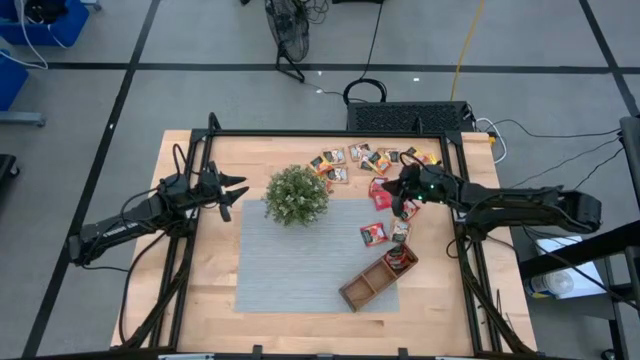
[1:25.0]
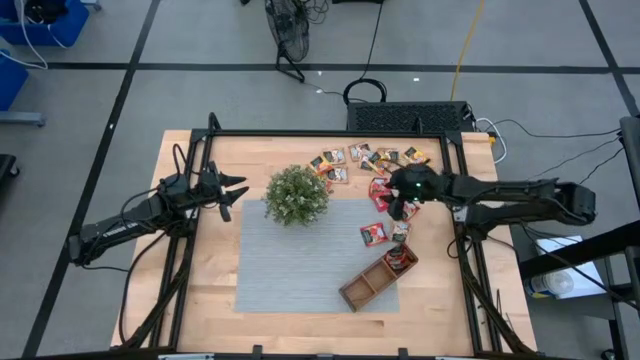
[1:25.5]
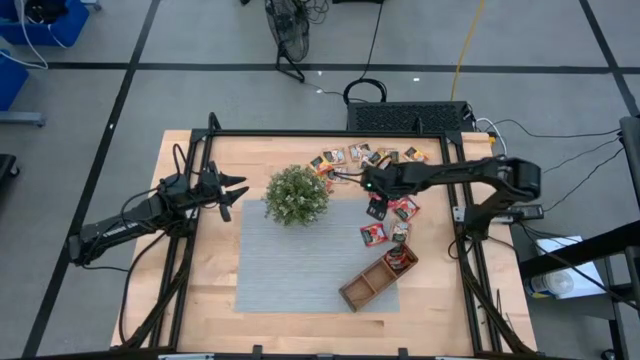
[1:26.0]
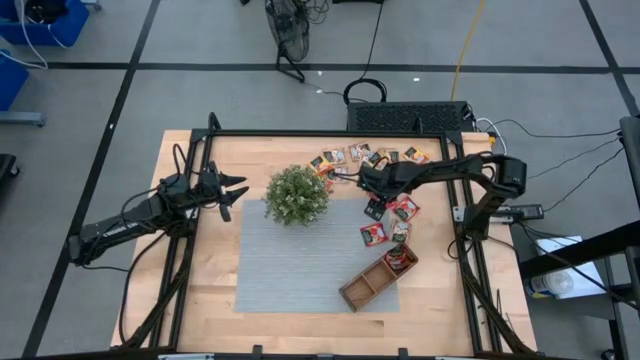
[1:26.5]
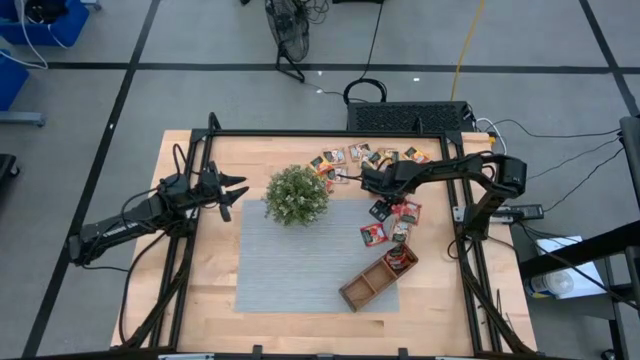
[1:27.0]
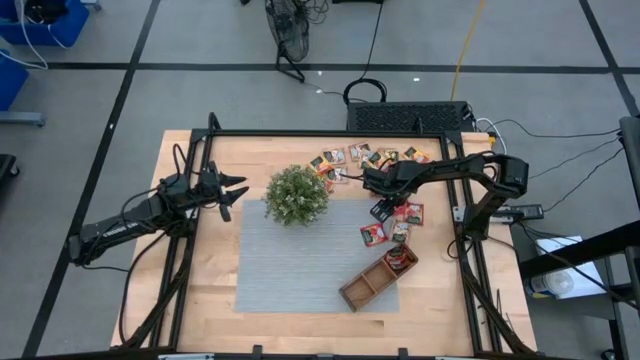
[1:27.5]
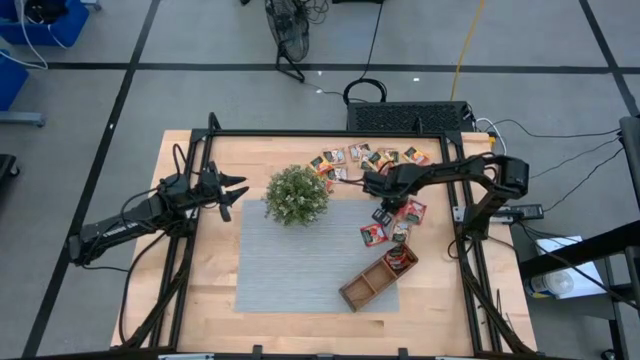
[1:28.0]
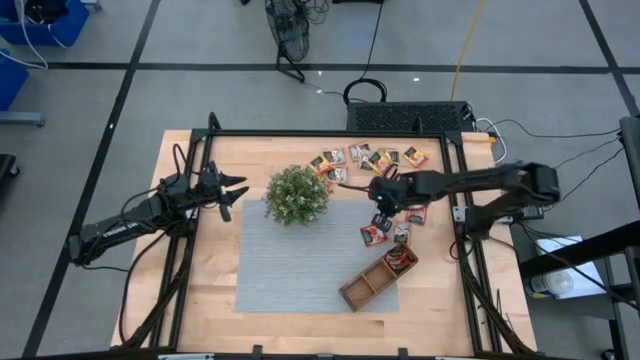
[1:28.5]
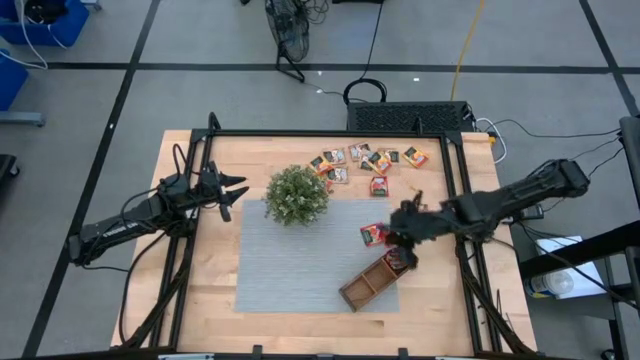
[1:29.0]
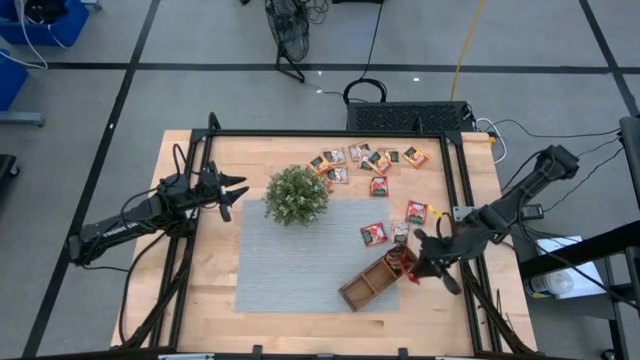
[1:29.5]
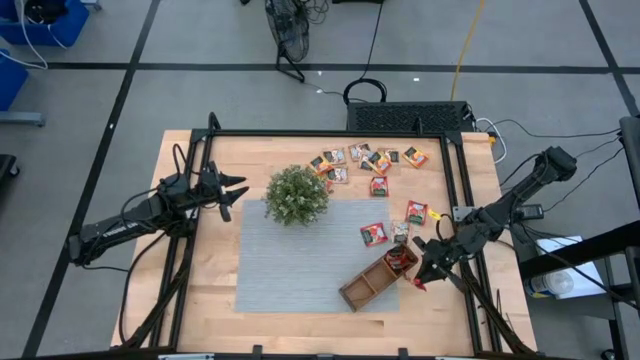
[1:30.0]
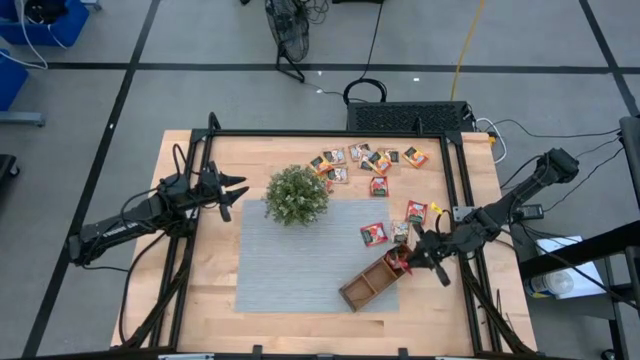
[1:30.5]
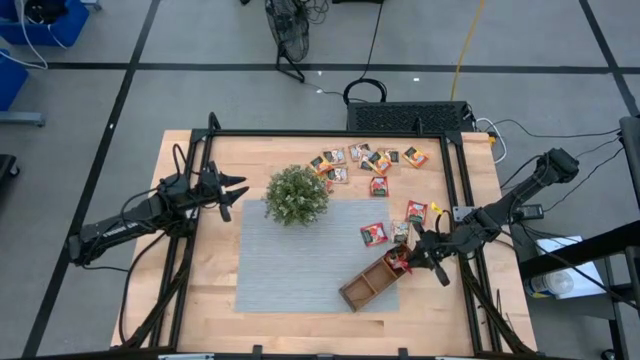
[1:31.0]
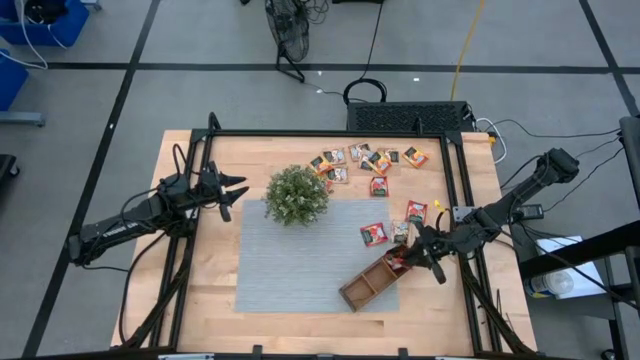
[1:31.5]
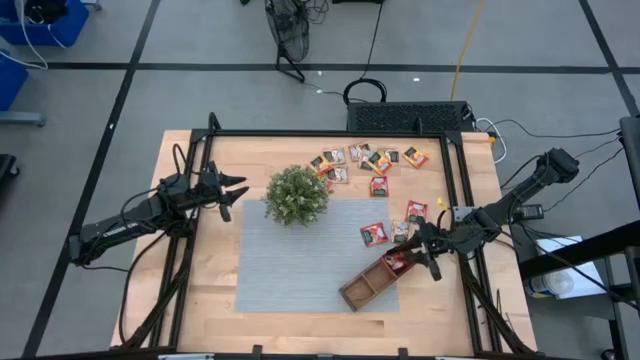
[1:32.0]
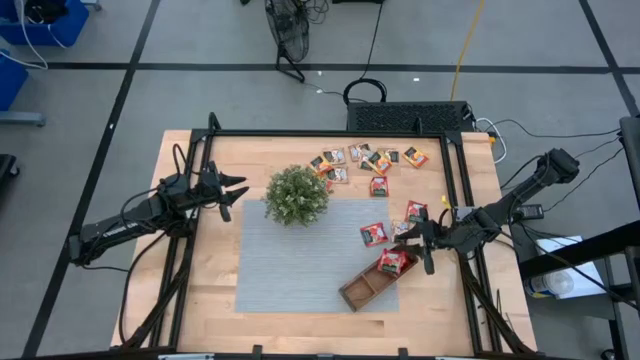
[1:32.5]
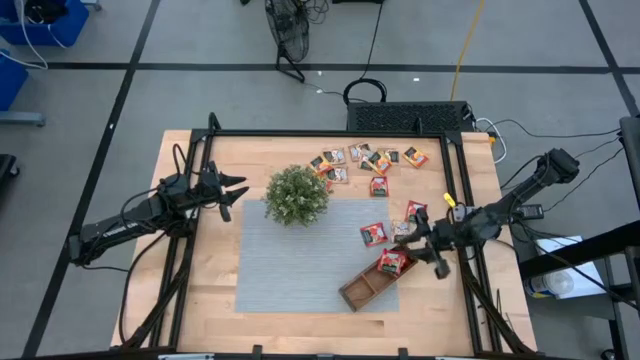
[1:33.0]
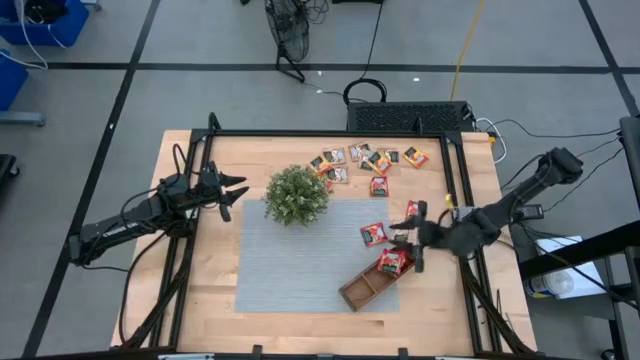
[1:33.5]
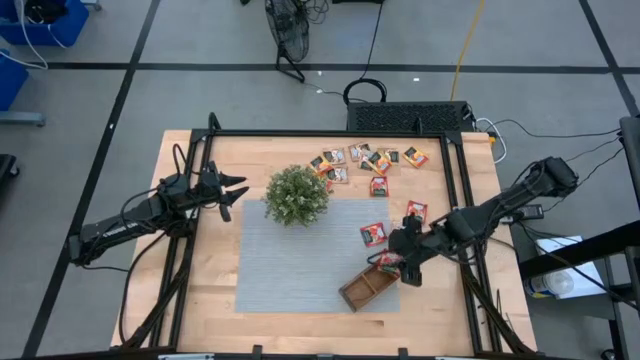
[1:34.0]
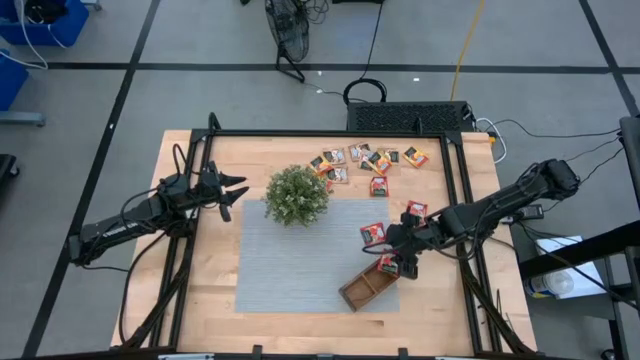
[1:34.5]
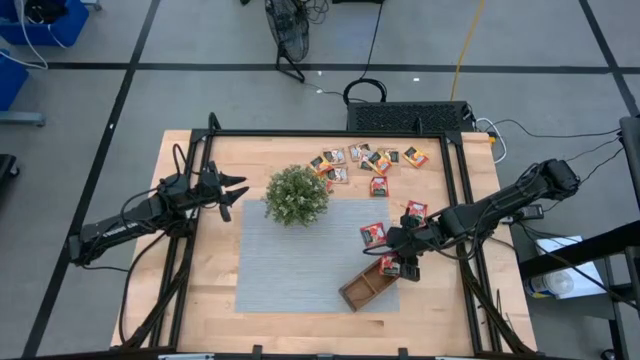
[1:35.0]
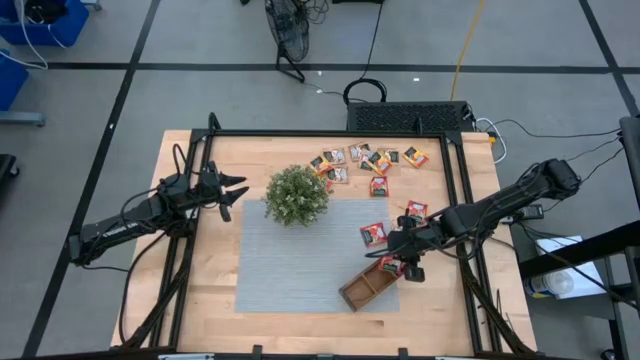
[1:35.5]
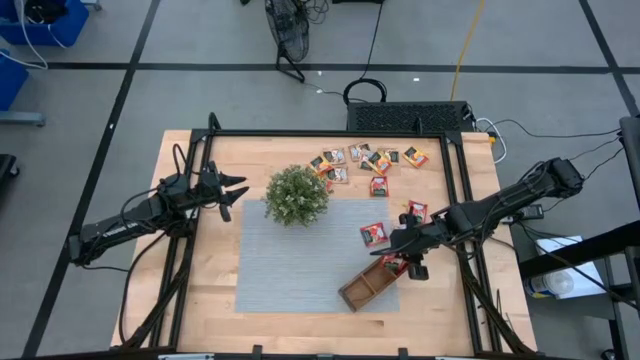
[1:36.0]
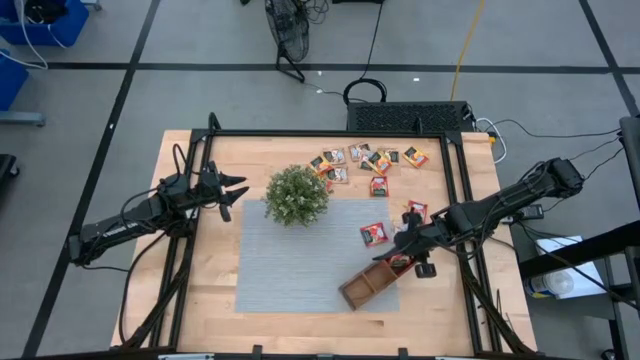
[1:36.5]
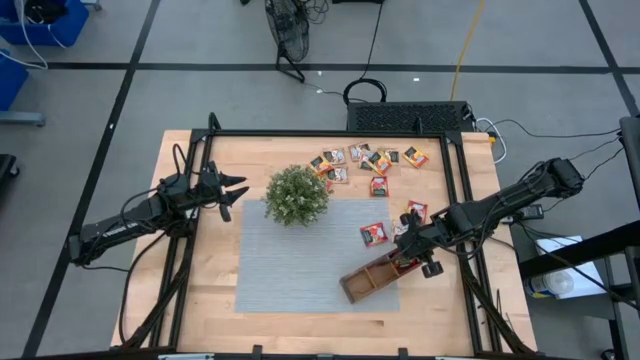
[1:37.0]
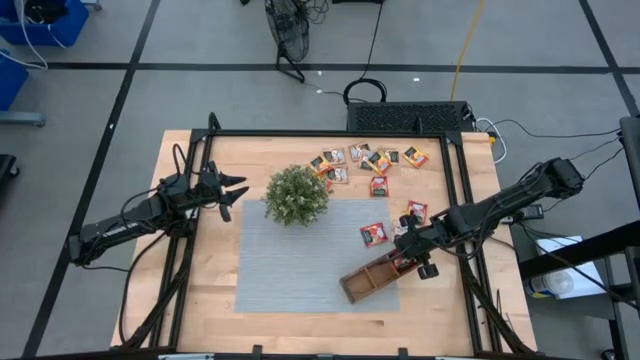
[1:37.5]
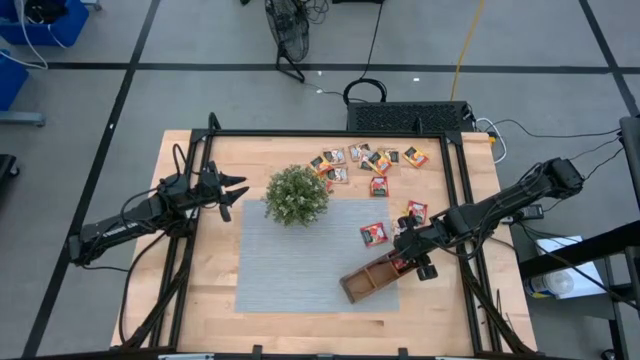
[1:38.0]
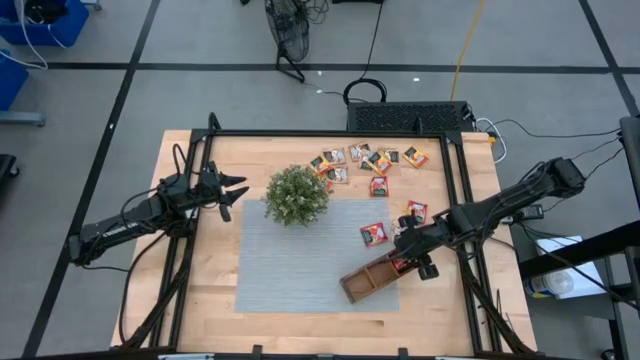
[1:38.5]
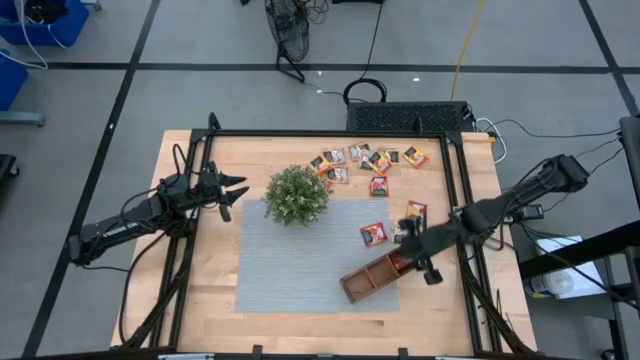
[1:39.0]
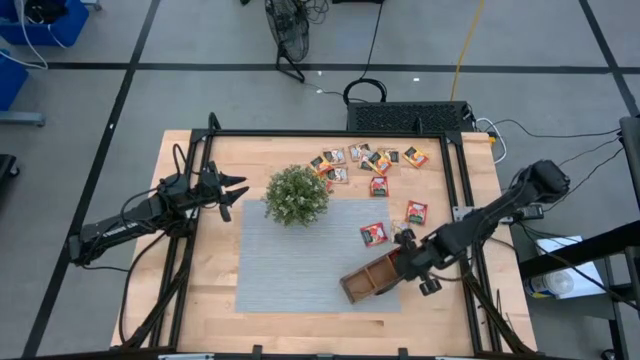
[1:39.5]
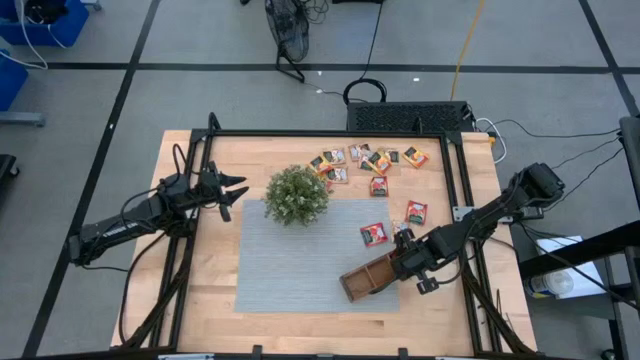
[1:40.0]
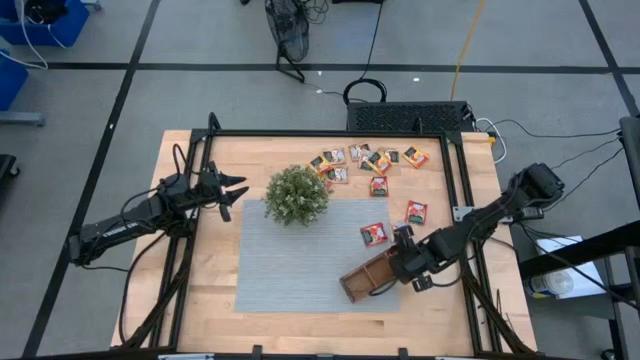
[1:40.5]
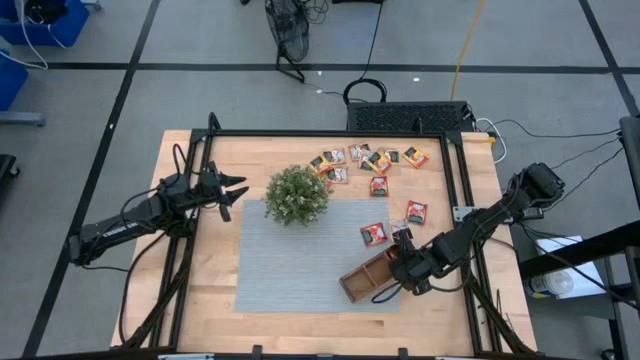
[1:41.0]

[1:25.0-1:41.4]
Task: Pick & Place Tea
Put the strawberry tea sachet into the brown organizer

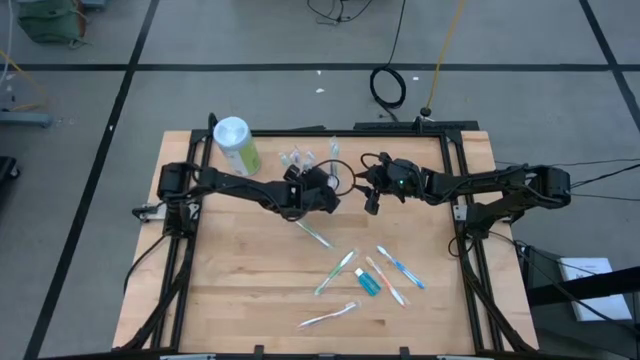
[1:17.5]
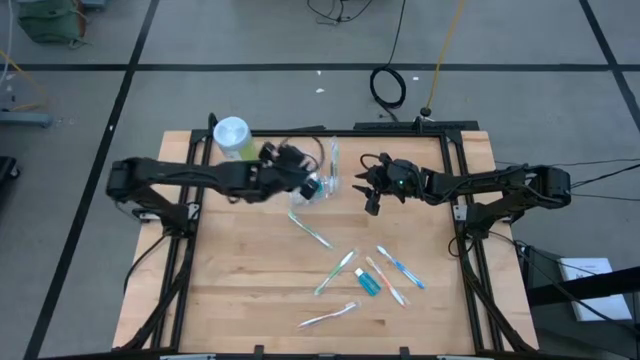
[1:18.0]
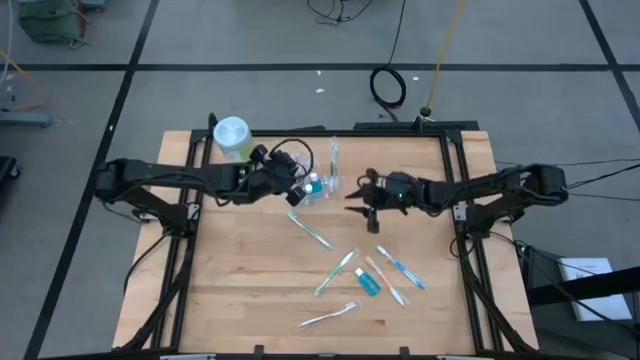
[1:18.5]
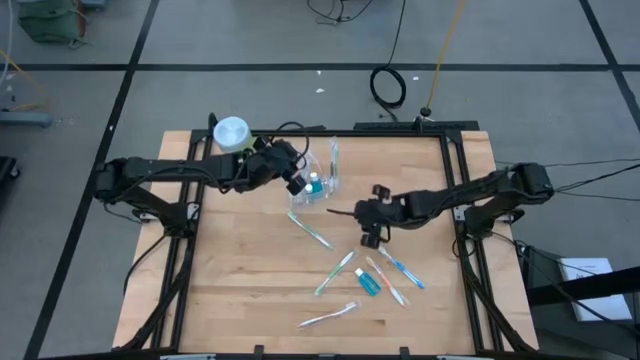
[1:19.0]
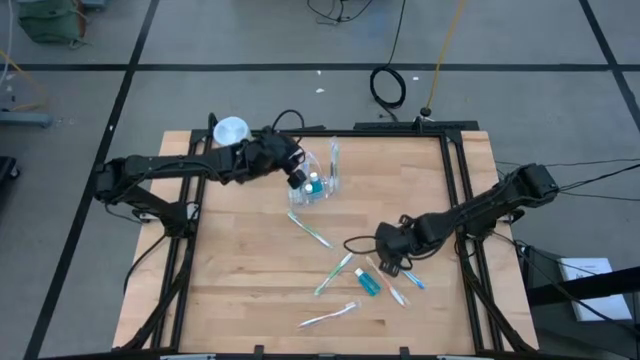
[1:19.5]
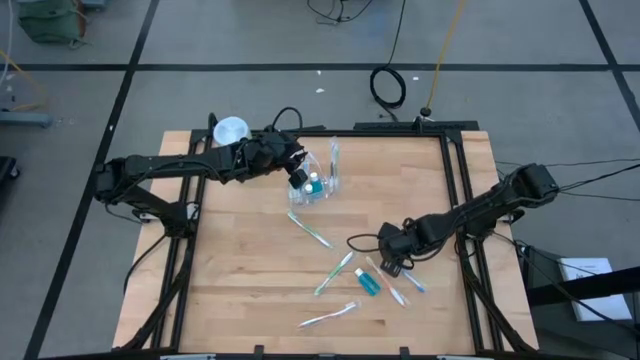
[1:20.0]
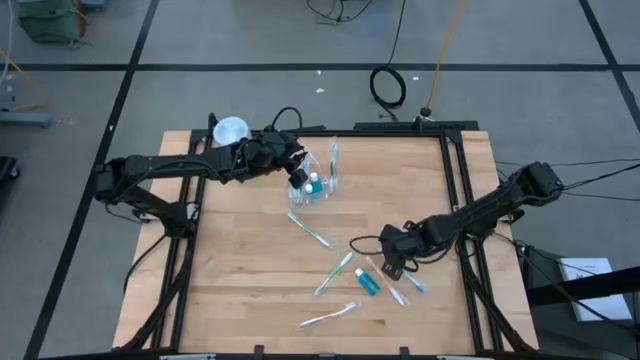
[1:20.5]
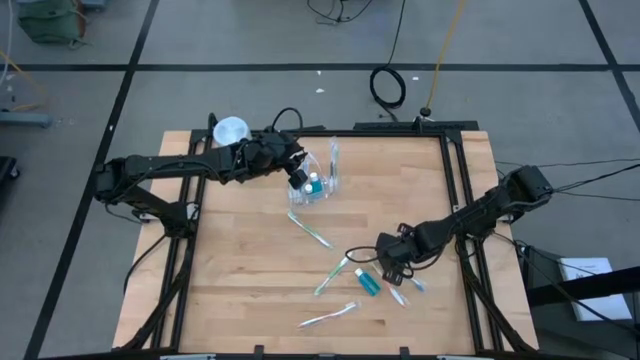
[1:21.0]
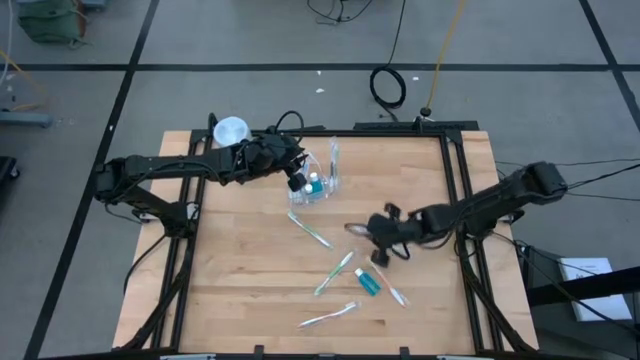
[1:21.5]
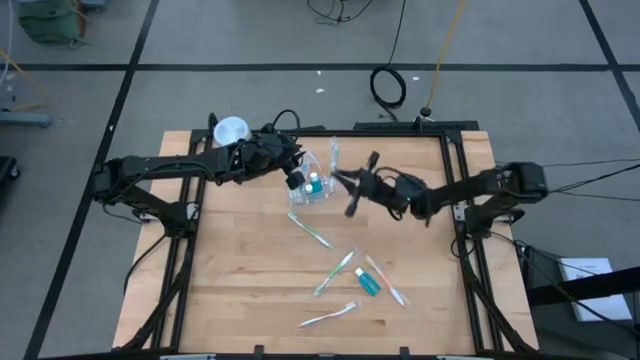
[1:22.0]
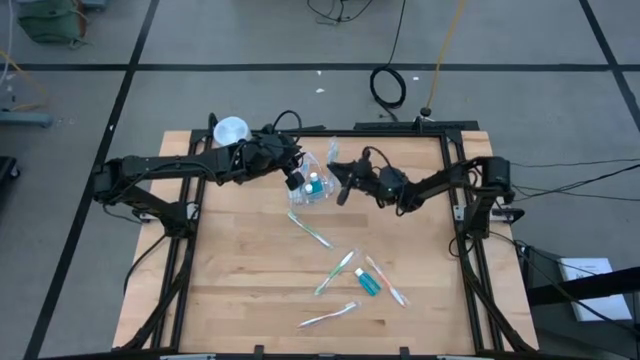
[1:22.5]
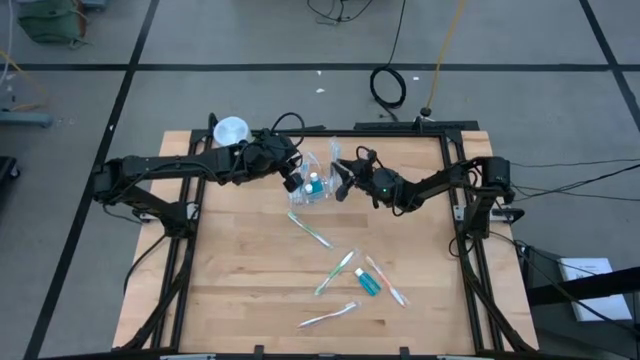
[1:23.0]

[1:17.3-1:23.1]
Task: Pick & Place toothbrushing station
Put the blue toothbrush into the transparent organizer
